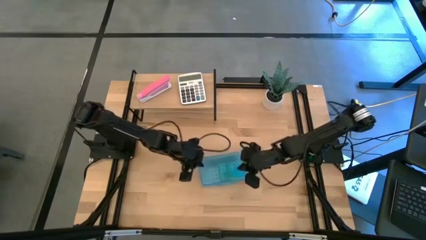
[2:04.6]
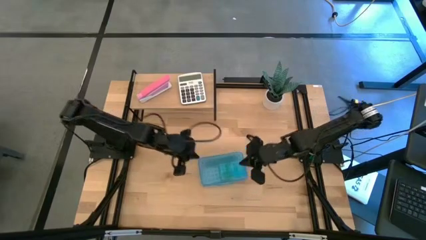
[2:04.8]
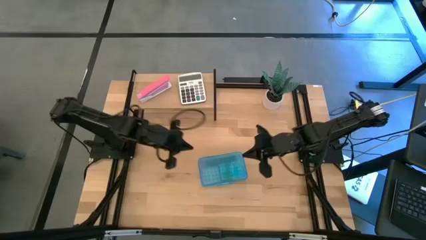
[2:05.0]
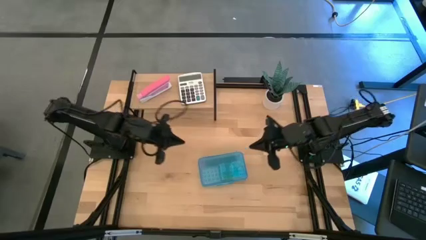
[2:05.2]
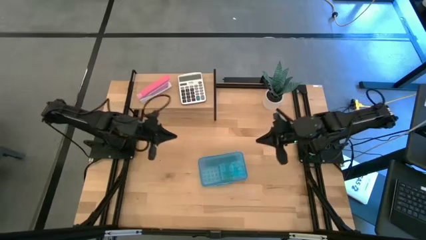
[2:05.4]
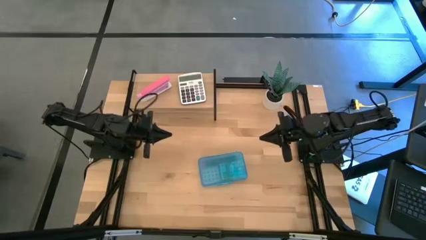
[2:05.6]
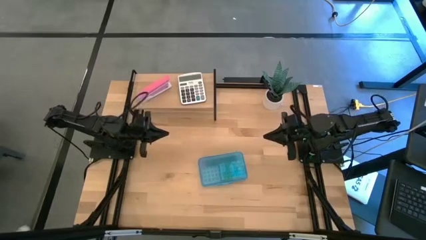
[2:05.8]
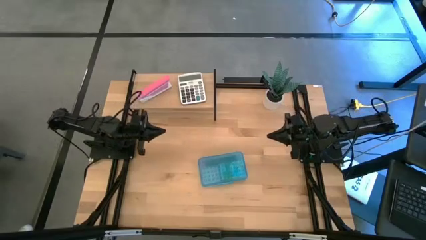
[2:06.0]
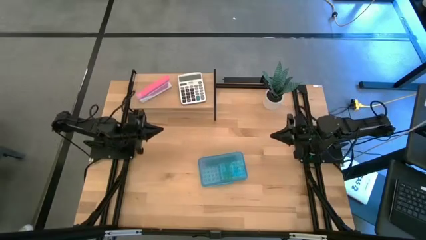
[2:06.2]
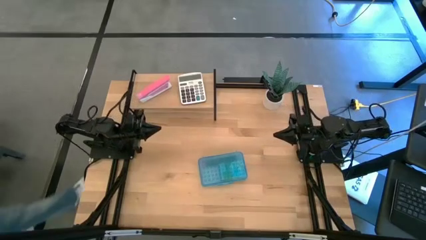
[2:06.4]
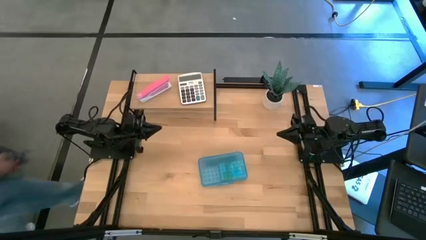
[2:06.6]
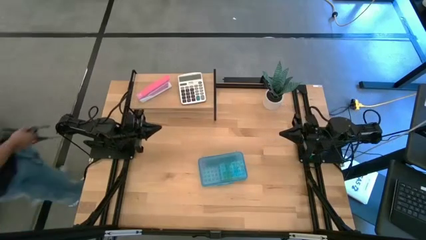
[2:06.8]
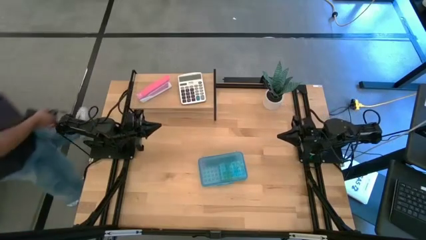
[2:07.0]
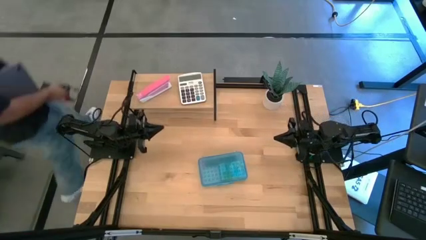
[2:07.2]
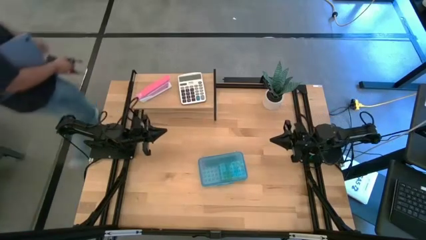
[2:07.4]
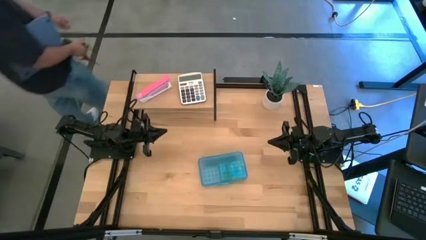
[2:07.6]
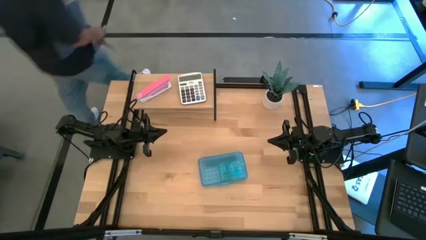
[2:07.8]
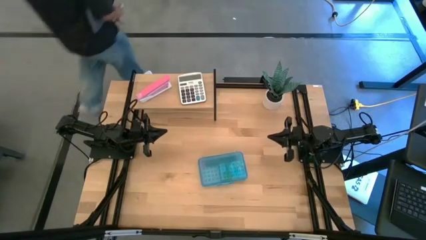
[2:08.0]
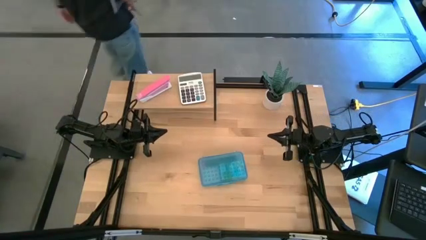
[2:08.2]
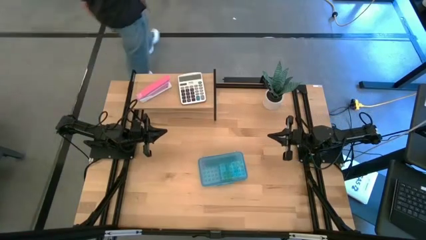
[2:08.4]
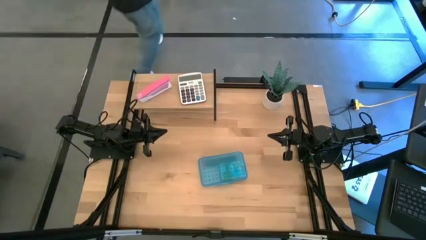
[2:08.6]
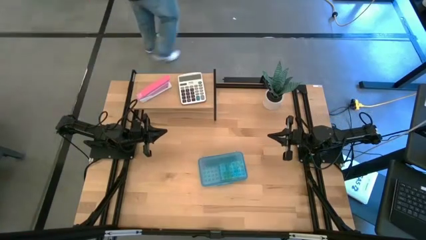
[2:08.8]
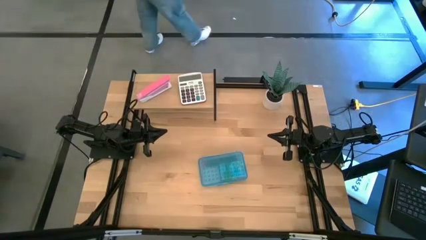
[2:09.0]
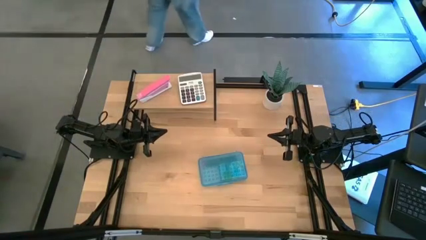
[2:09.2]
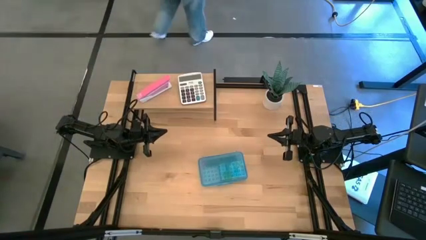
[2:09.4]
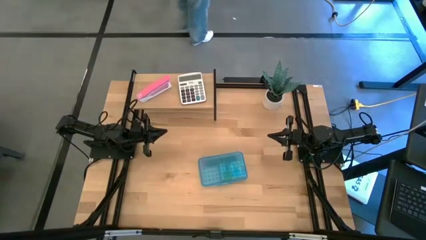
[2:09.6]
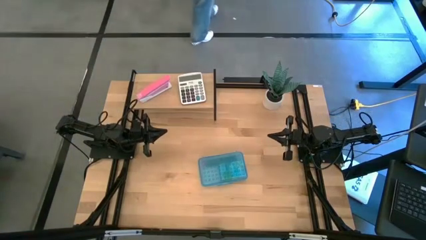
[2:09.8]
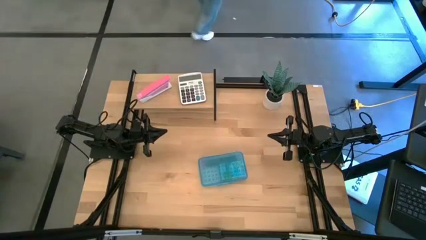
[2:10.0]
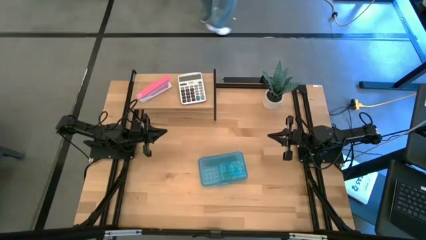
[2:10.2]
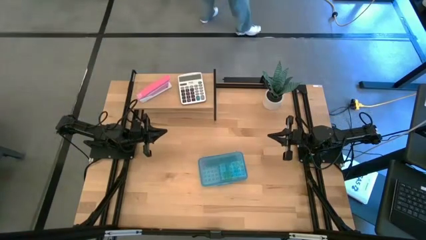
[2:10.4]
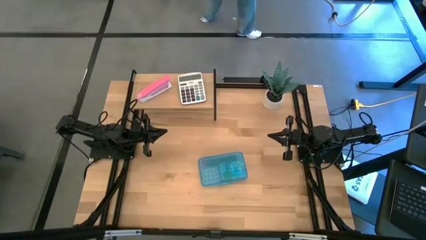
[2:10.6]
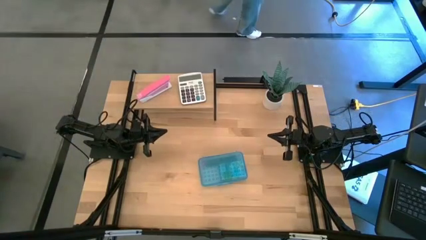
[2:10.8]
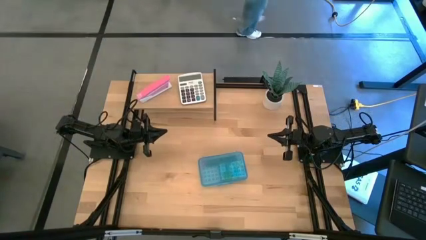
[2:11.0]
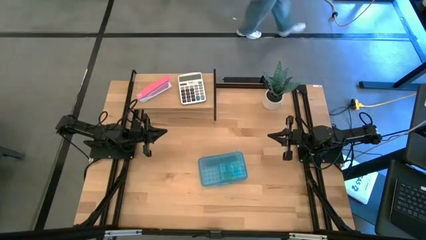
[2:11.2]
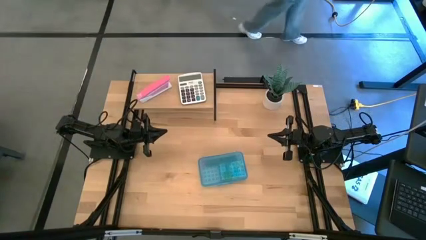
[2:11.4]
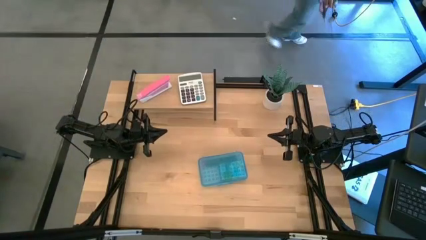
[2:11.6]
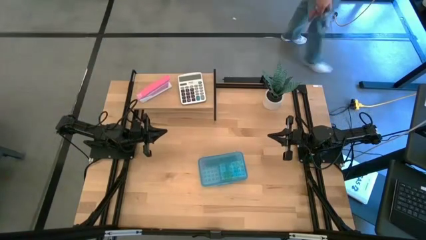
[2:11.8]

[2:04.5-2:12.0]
Task: Pack school essentials
Return to Home Position

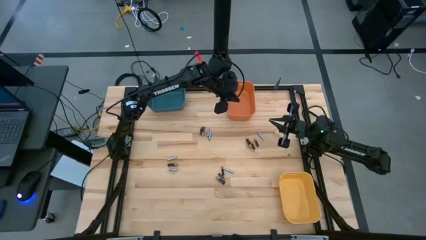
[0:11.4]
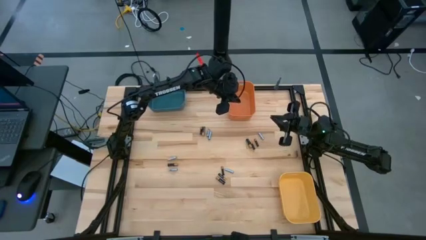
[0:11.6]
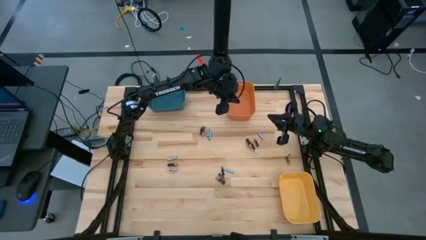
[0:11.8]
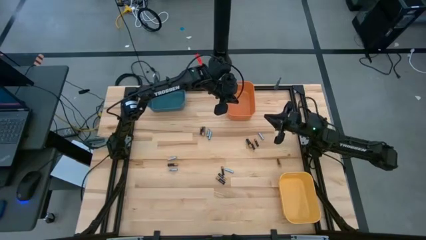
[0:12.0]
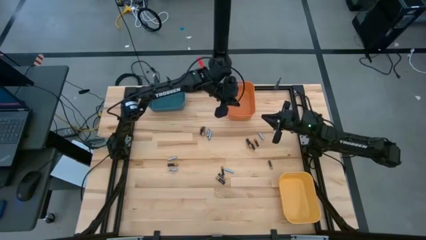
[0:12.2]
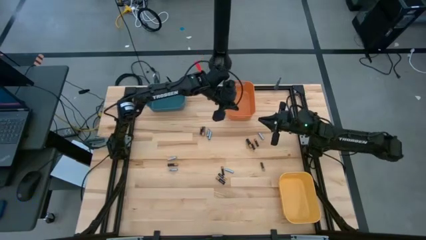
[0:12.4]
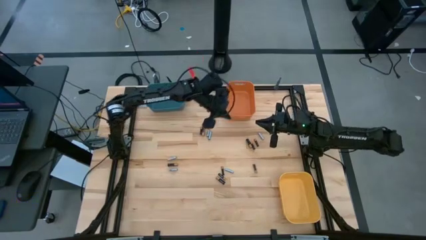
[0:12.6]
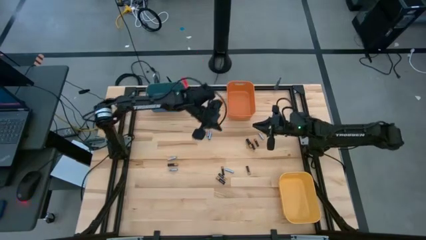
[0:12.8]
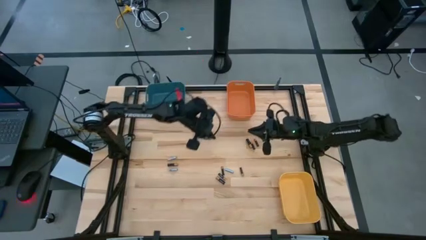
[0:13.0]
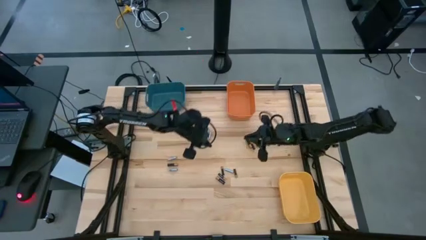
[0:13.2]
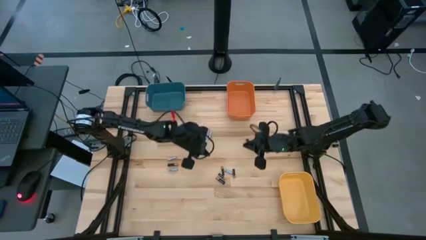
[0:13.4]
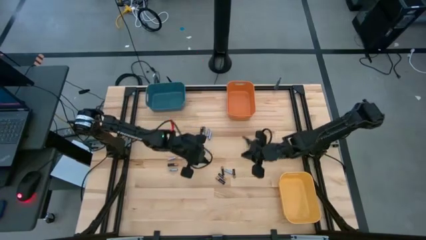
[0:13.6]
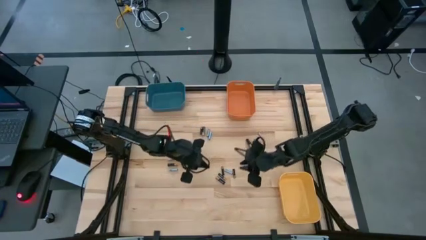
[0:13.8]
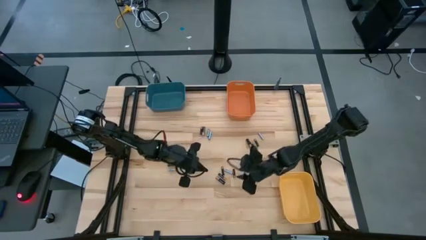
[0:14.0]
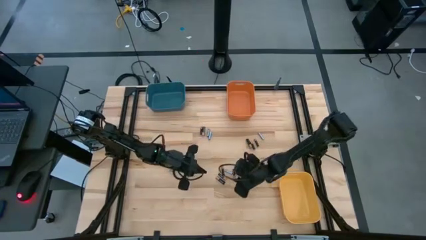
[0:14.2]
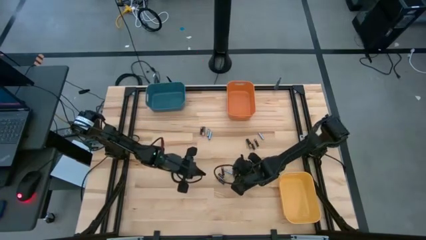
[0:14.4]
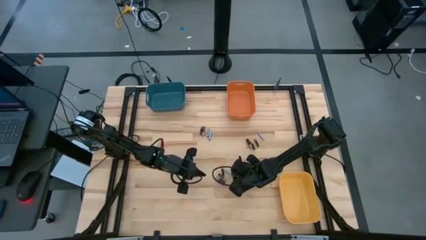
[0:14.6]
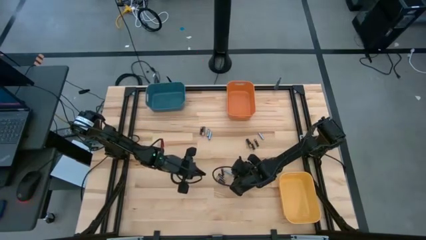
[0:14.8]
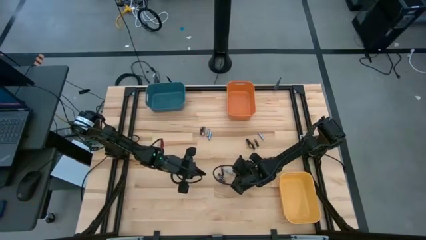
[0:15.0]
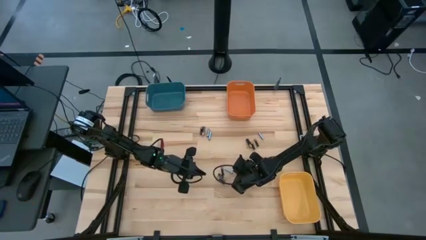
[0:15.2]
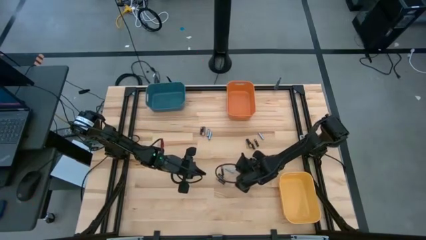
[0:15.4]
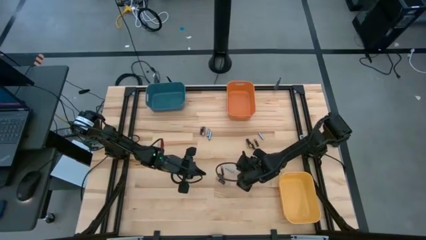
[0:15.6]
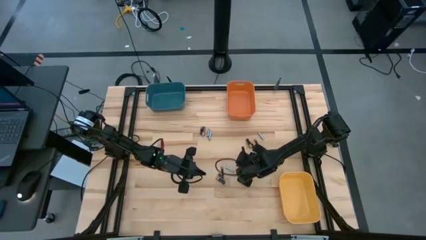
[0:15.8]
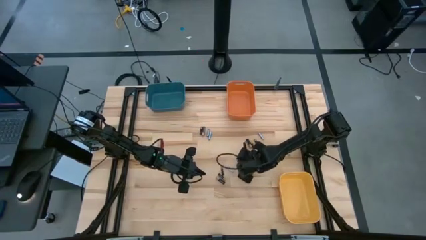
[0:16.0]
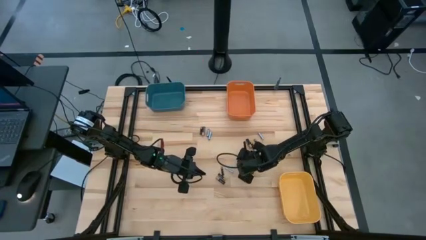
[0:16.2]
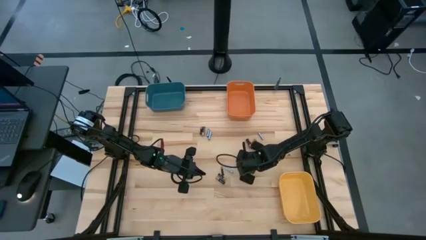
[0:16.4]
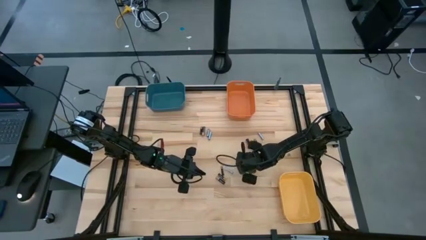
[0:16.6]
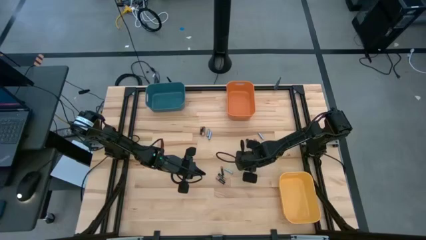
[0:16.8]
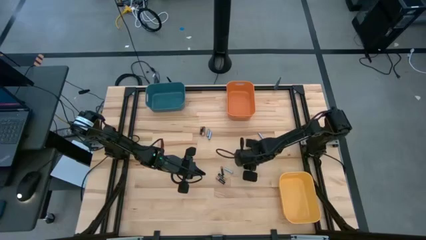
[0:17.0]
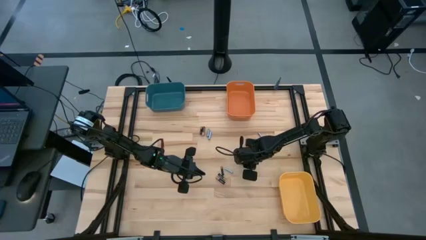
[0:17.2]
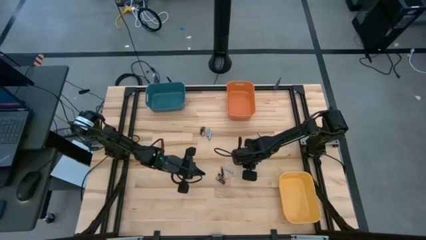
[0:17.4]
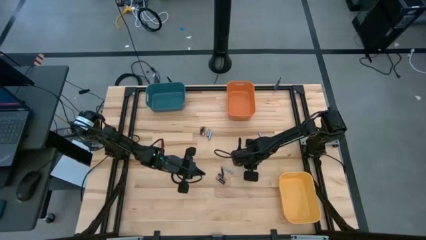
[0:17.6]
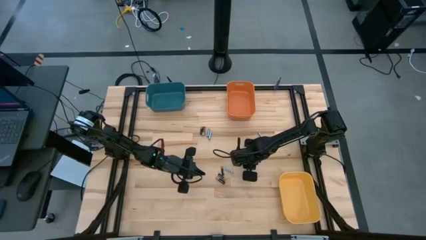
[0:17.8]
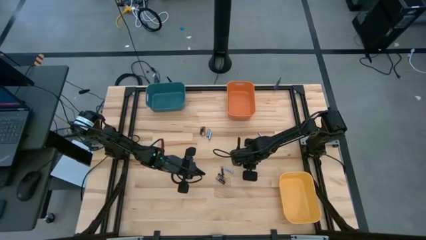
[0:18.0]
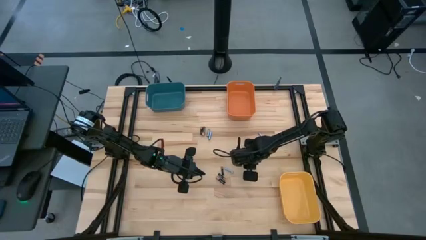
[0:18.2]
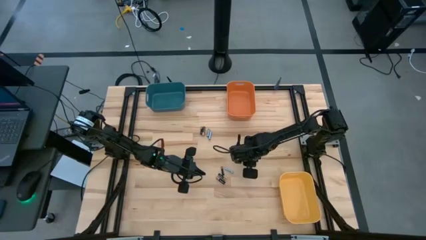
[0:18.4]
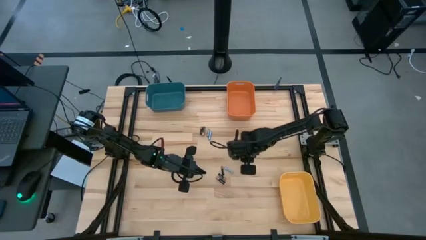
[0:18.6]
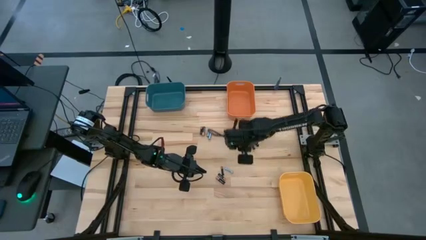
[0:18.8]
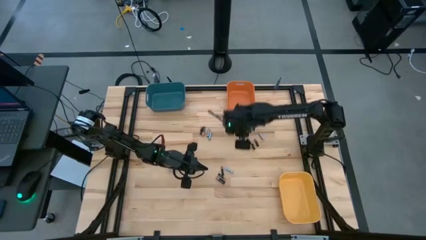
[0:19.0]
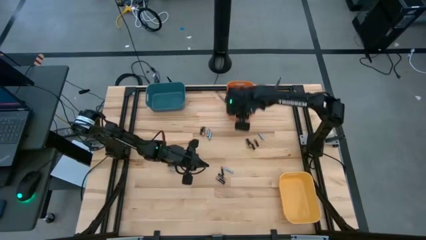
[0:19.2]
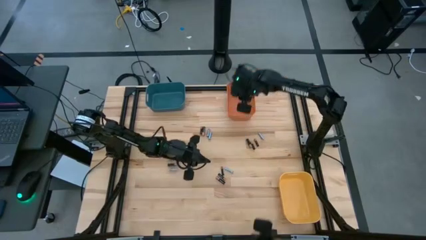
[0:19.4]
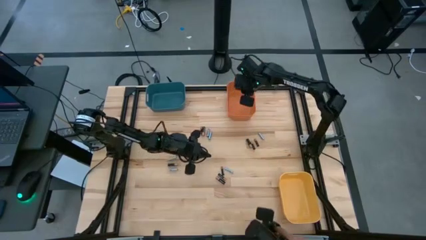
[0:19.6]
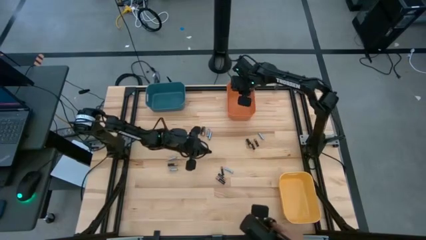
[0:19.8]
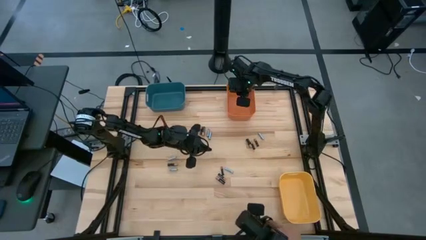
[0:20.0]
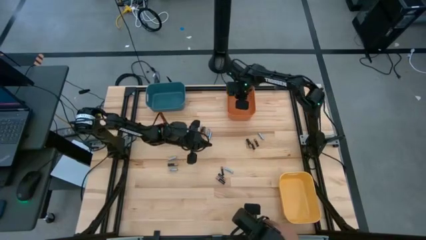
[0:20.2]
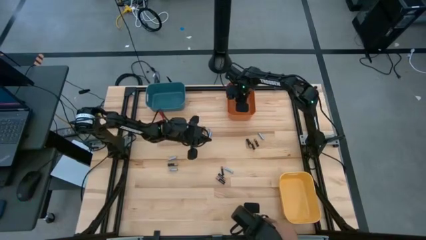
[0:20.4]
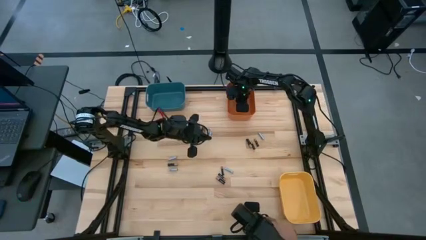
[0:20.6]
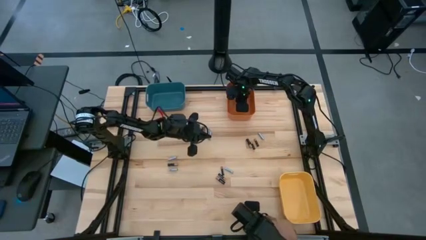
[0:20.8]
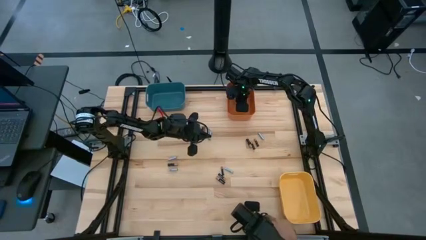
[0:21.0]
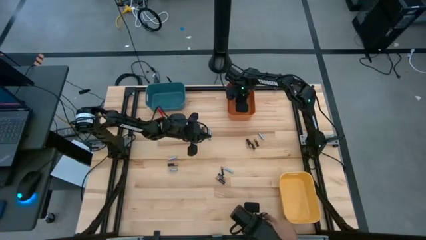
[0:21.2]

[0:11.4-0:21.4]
Task: Sort batteries
Put the small black battery into the orange bin
